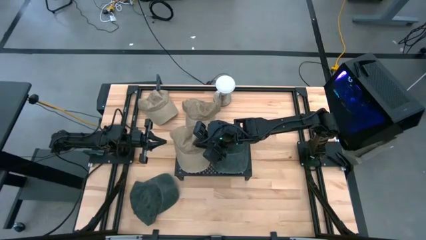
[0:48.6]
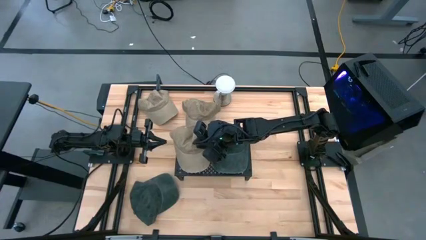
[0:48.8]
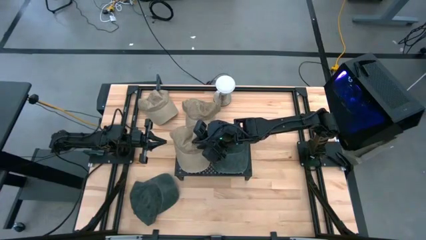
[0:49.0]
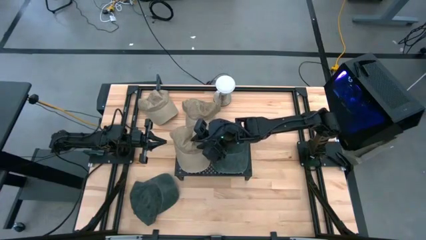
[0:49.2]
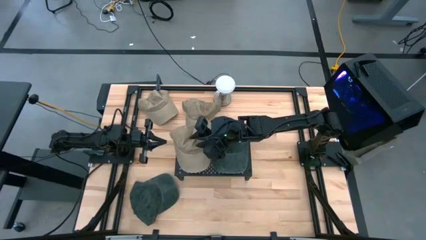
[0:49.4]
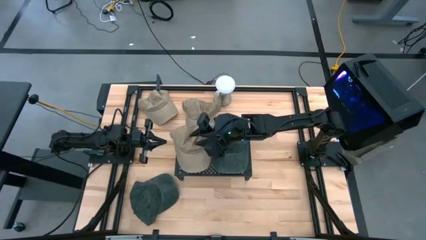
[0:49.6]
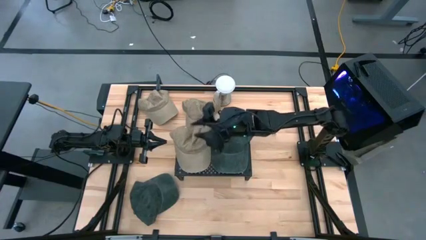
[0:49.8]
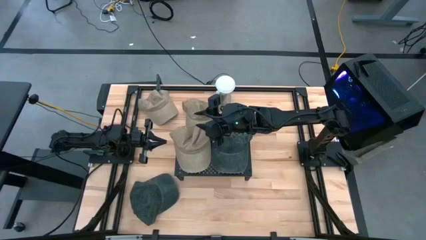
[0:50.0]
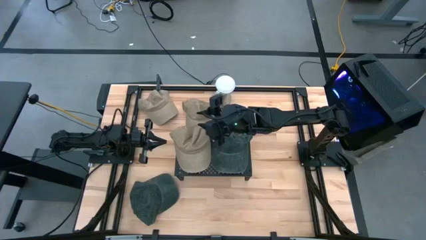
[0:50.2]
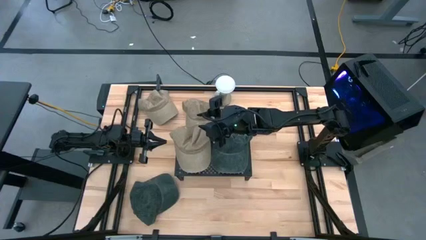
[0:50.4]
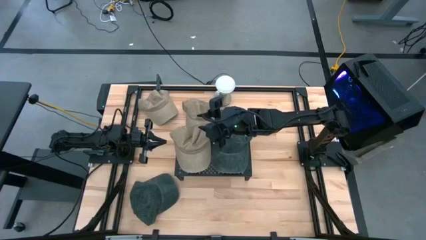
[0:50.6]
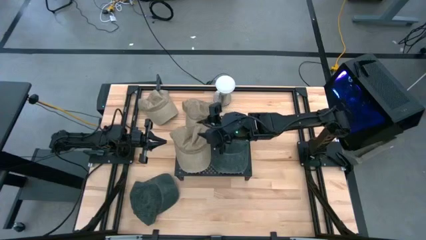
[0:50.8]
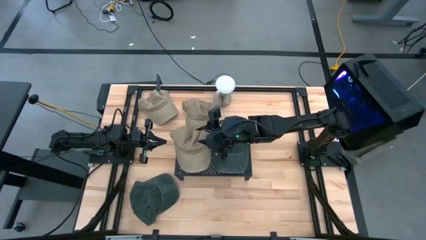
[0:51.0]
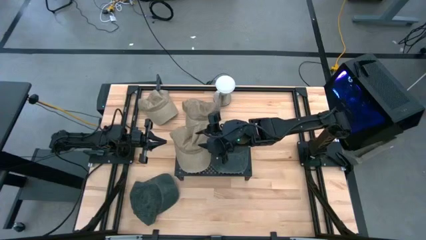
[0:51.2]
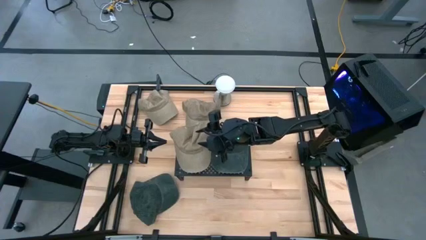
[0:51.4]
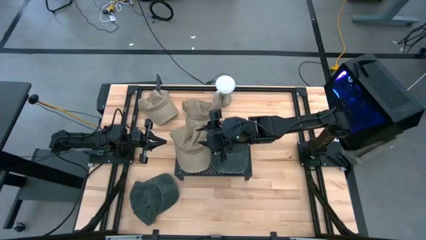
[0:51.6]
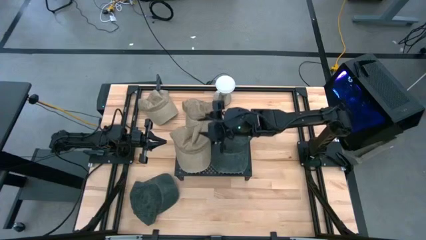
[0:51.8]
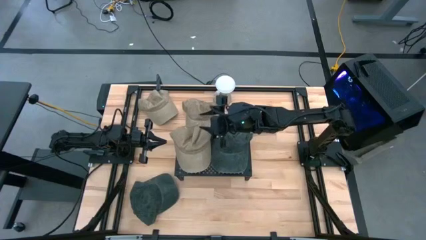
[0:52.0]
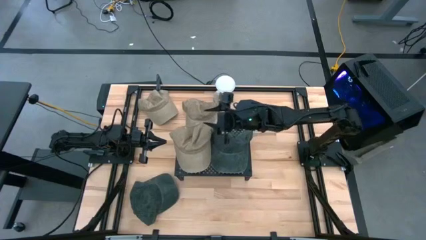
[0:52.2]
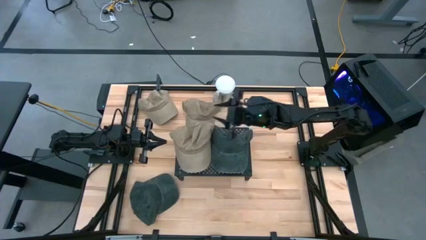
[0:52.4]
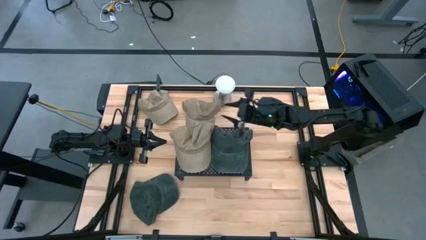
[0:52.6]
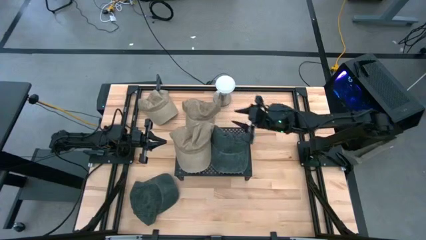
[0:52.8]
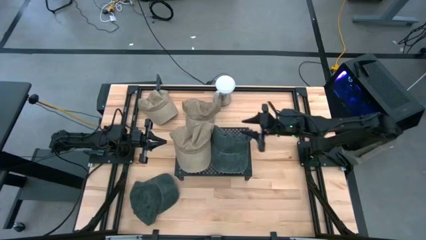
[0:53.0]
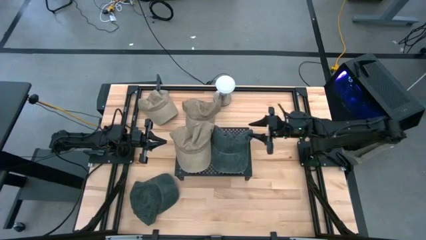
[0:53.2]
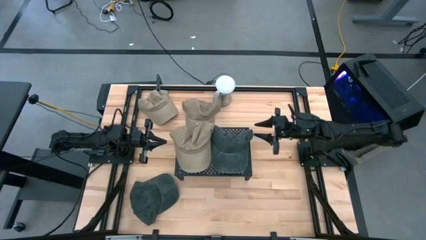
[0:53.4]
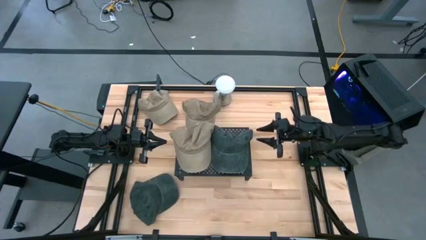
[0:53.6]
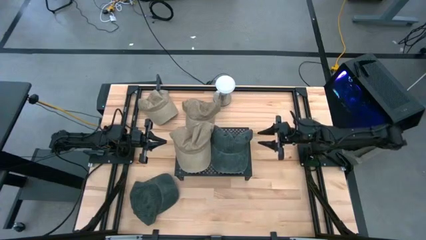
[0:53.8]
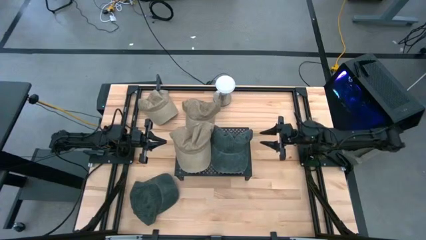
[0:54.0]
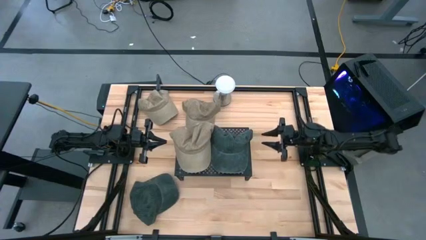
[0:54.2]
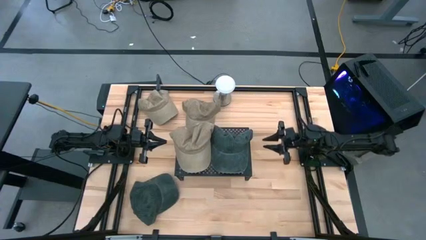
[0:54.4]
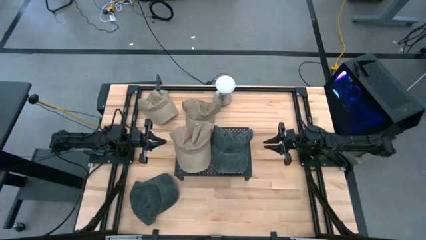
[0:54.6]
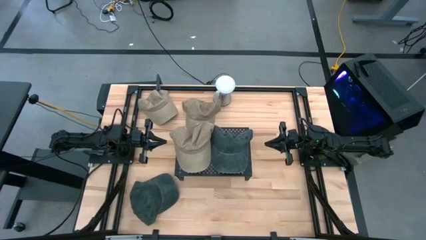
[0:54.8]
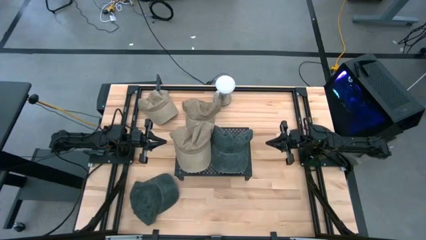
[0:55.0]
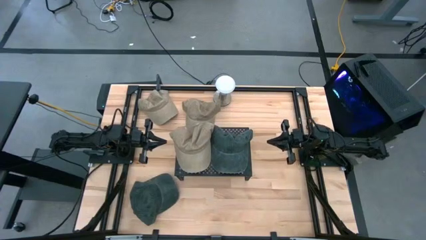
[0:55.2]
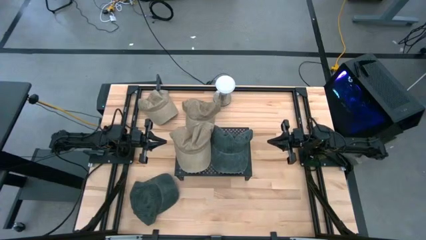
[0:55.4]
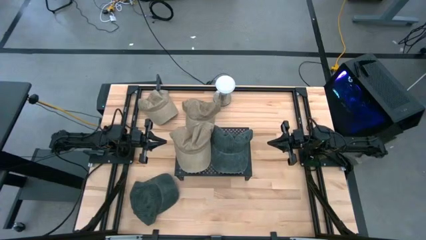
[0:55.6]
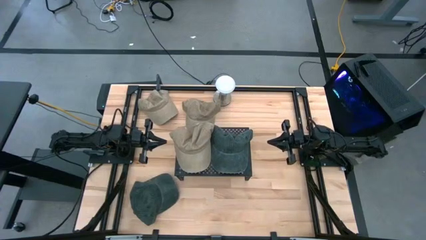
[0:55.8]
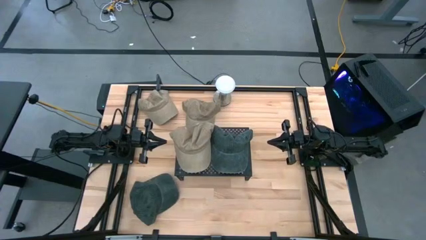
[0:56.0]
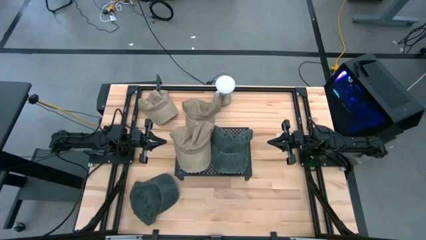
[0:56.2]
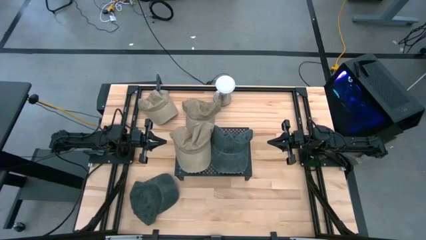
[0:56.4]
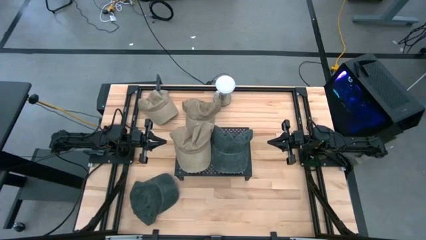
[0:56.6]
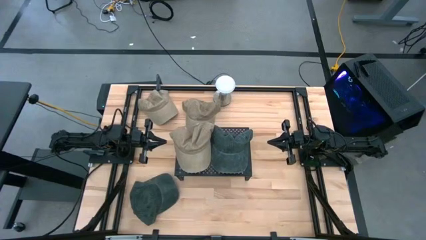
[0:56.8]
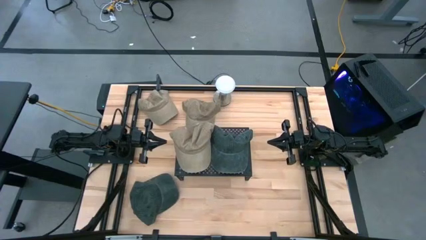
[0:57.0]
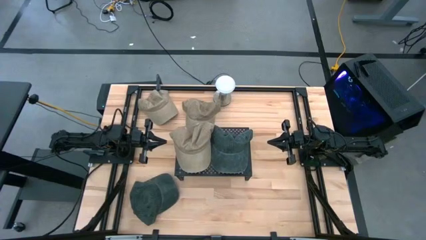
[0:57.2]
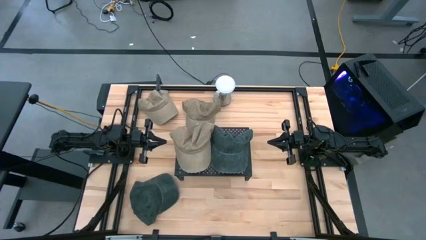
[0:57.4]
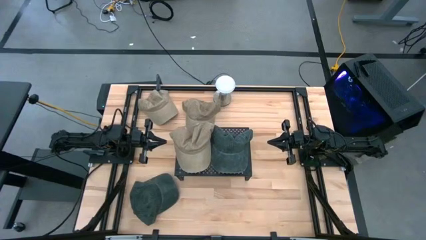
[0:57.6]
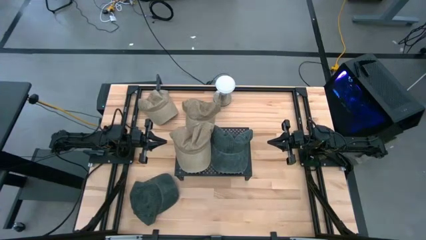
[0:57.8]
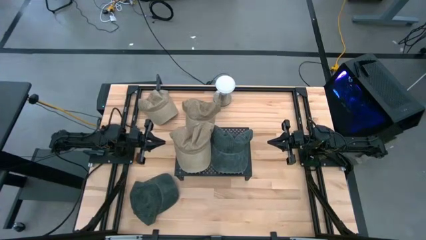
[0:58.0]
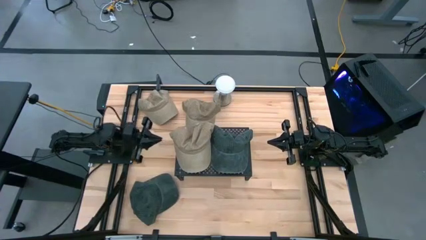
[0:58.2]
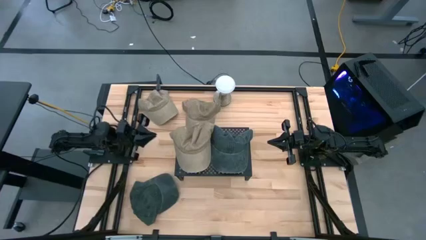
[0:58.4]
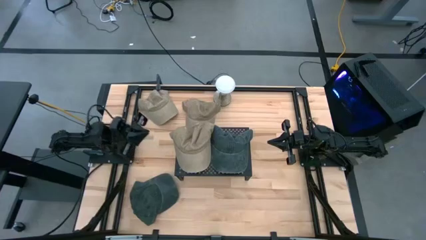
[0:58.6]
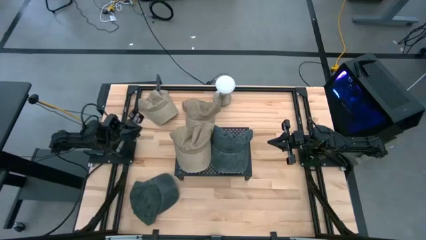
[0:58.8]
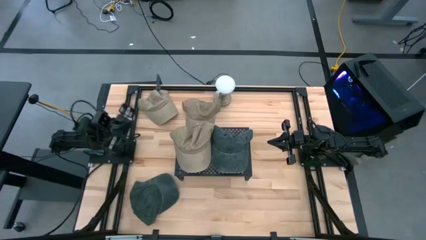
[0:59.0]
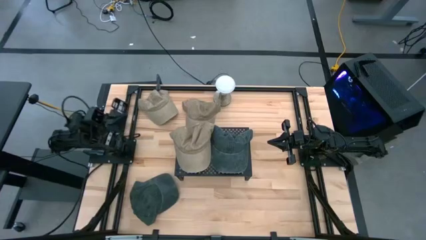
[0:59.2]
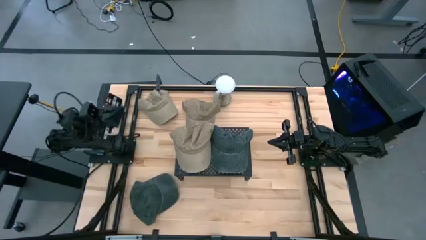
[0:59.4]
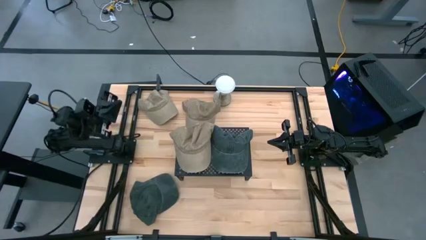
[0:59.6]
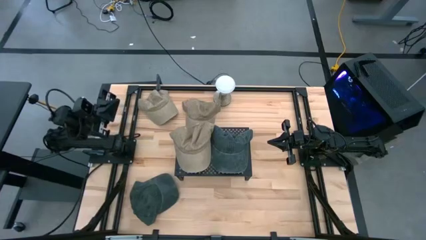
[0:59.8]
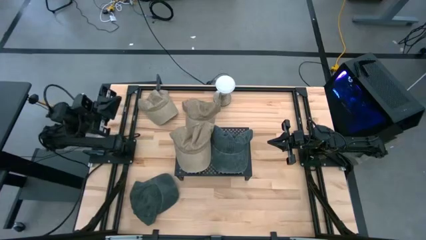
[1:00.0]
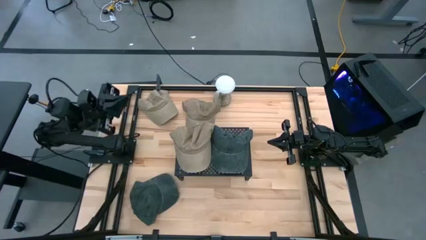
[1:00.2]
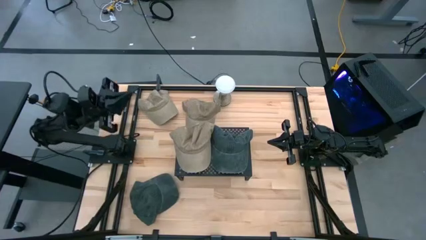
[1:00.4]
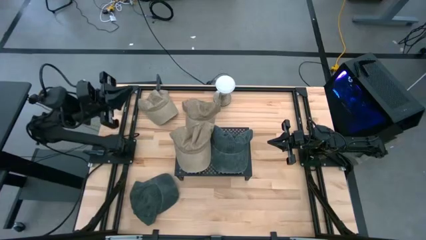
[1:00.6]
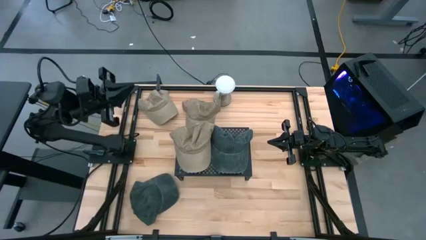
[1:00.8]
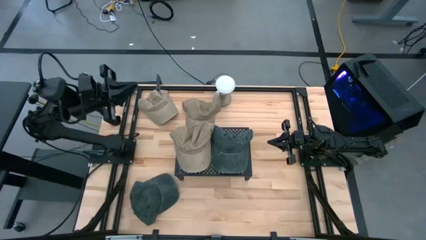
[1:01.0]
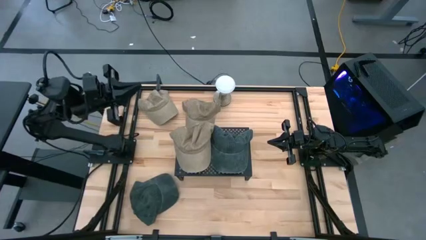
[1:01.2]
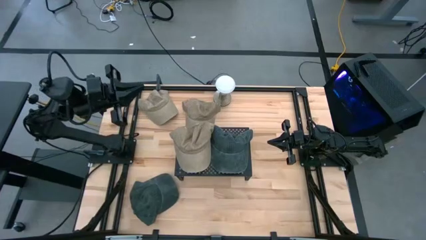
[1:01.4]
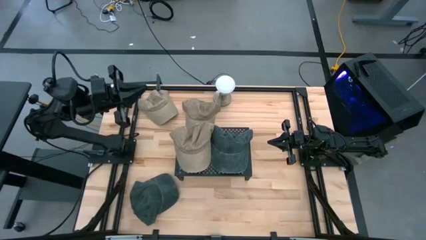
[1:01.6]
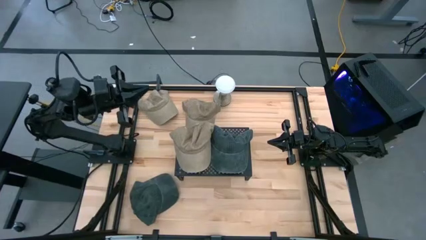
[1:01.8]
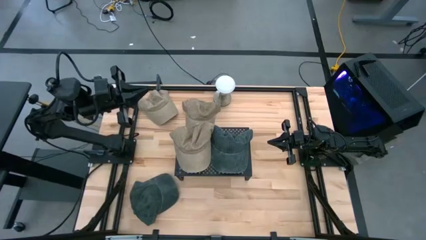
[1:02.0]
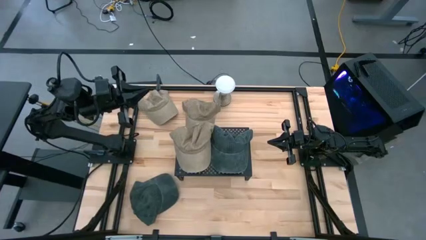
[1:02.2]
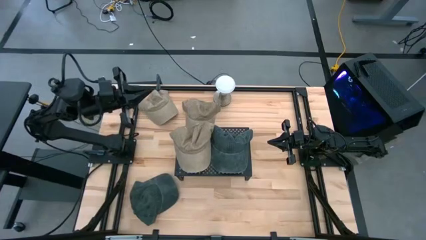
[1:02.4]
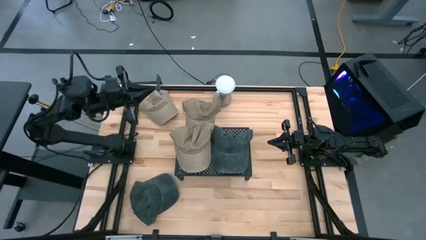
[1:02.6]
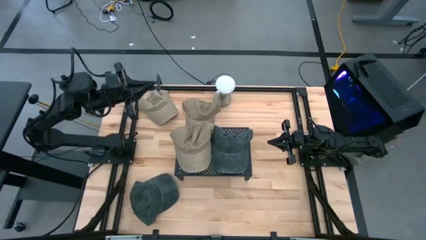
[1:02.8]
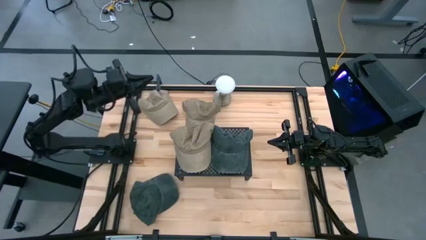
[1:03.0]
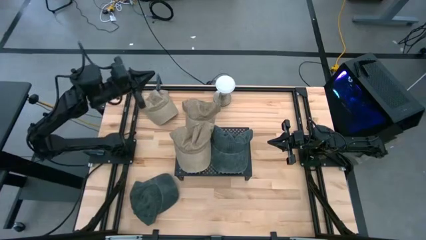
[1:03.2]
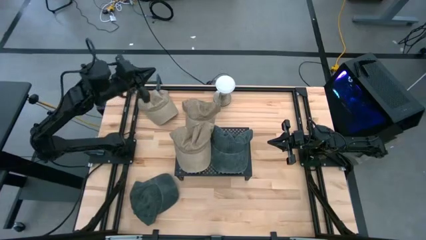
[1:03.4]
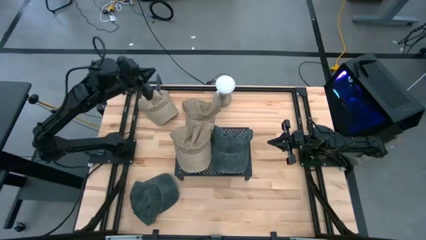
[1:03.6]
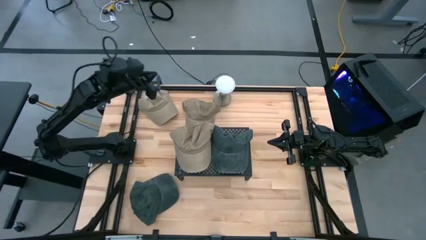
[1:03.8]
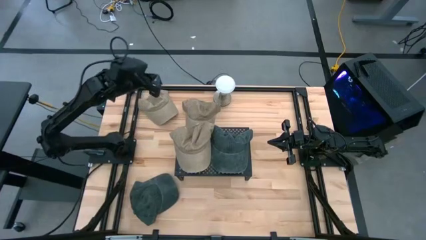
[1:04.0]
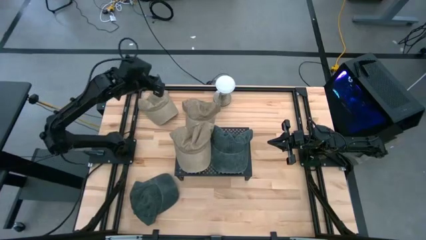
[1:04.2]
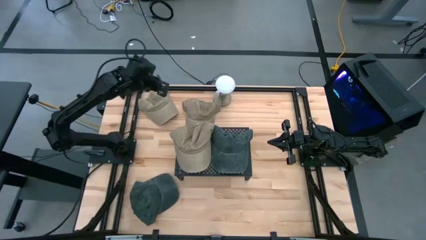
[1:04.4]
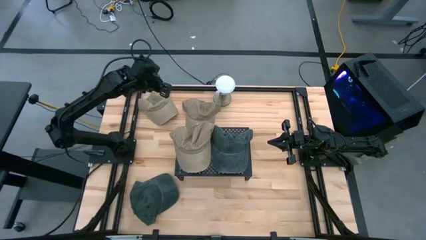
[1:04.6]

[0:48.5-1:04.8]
Task: Pick & Place hat
Stack the left brown cap on the brown cap on the shelf
